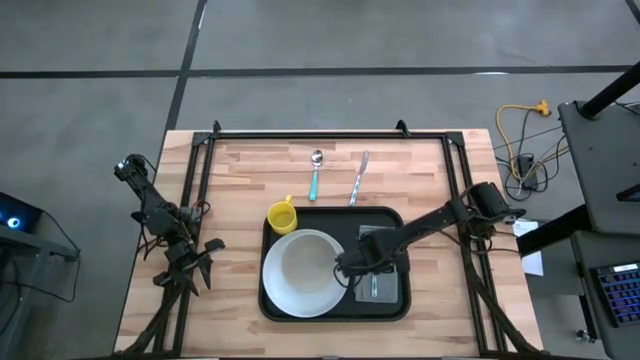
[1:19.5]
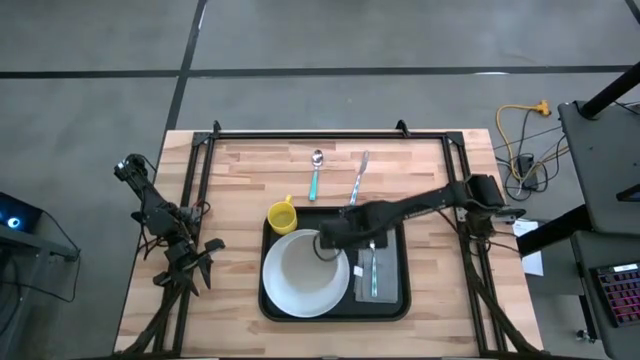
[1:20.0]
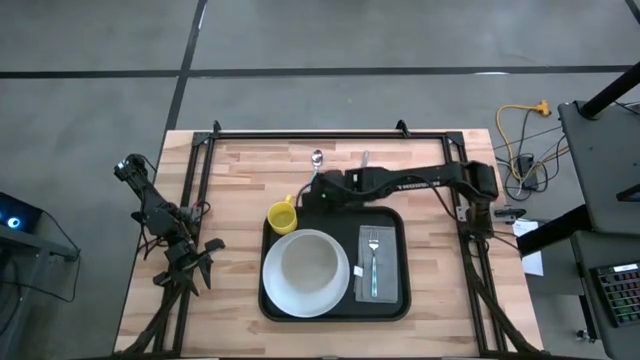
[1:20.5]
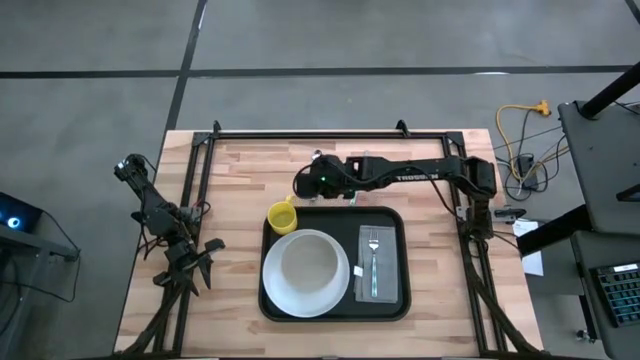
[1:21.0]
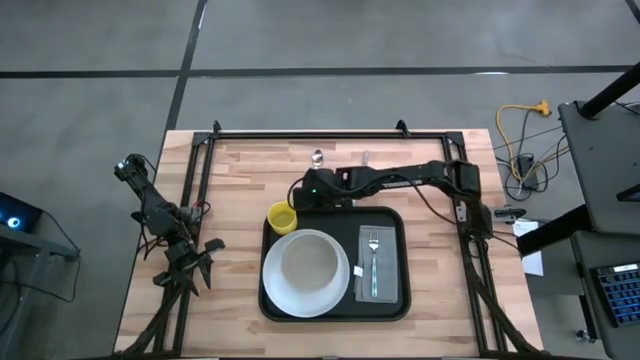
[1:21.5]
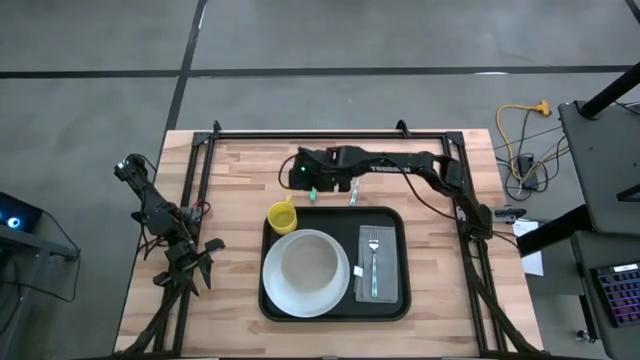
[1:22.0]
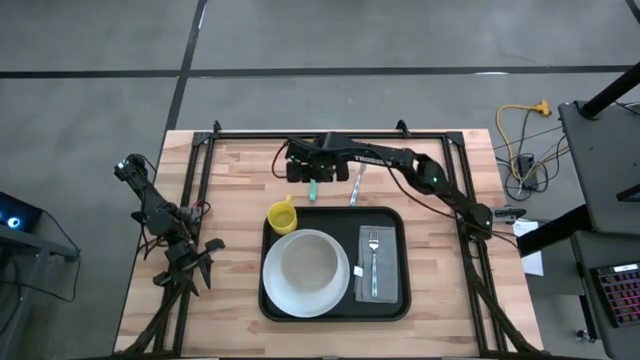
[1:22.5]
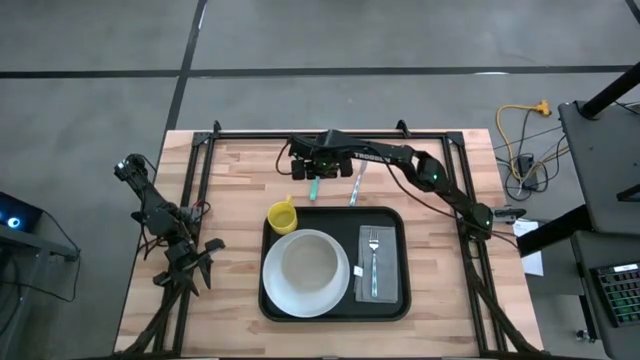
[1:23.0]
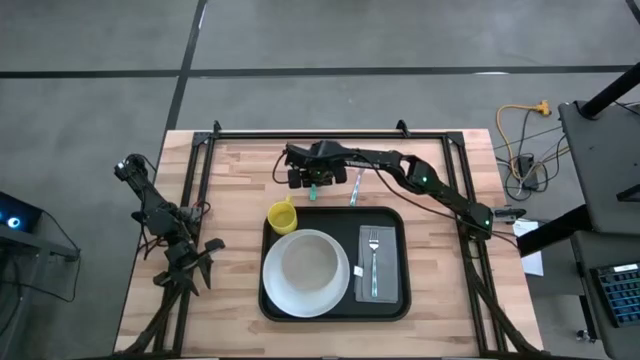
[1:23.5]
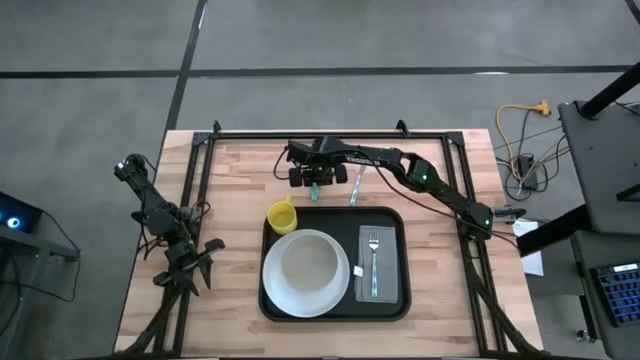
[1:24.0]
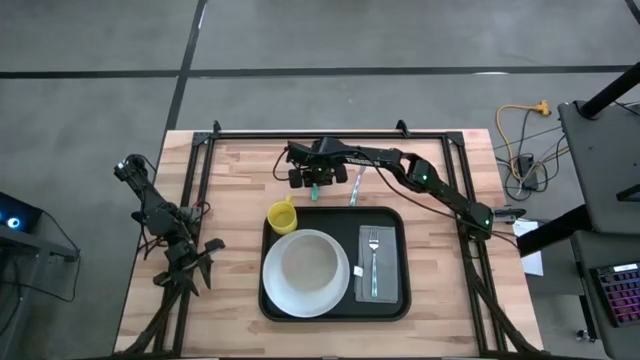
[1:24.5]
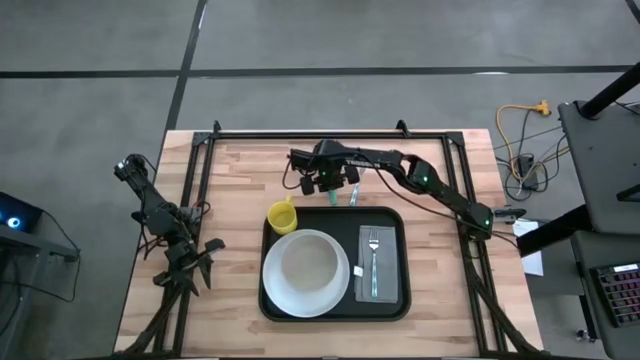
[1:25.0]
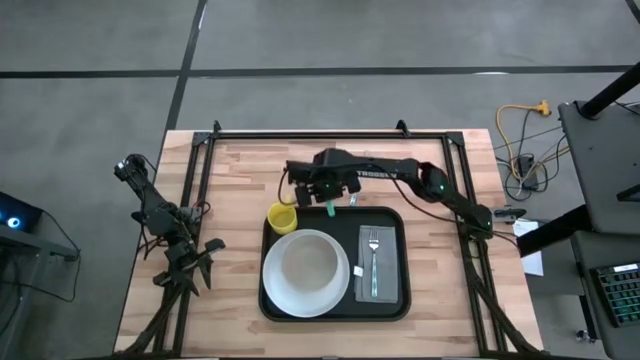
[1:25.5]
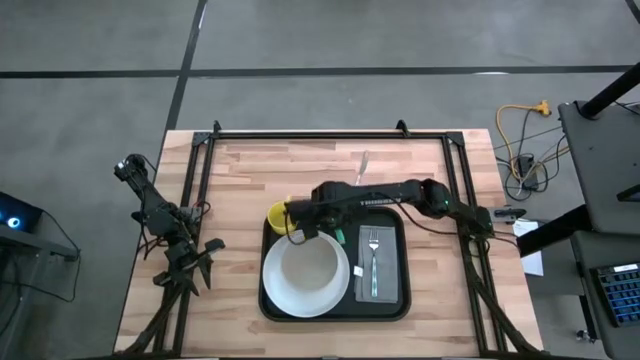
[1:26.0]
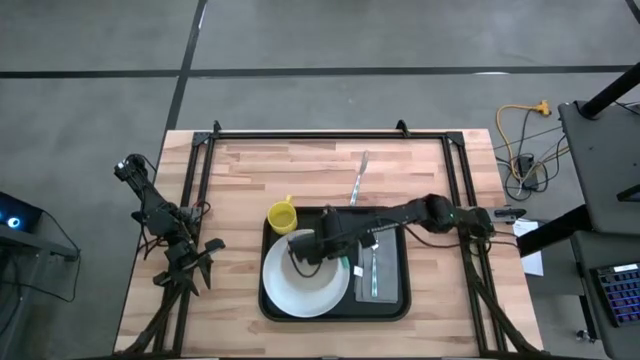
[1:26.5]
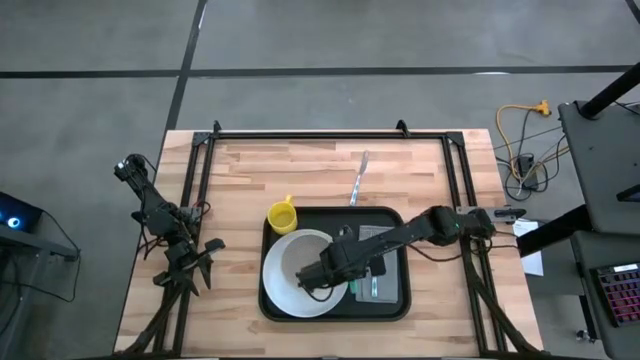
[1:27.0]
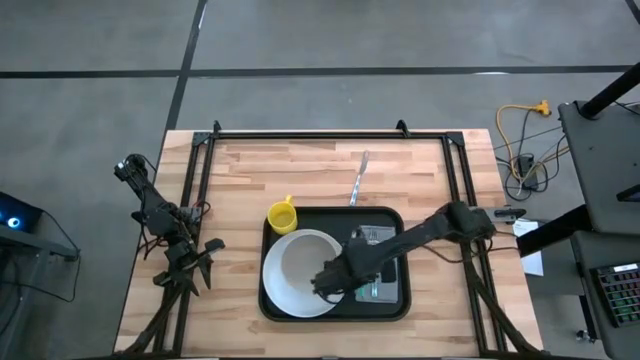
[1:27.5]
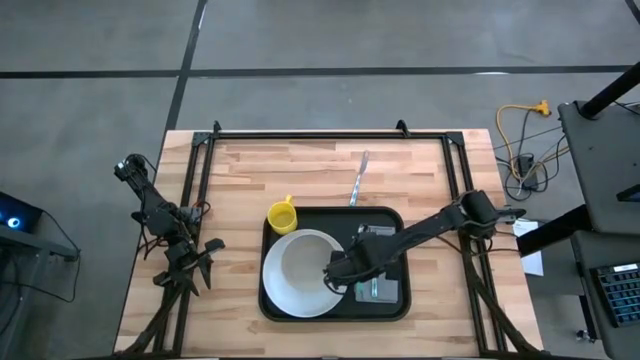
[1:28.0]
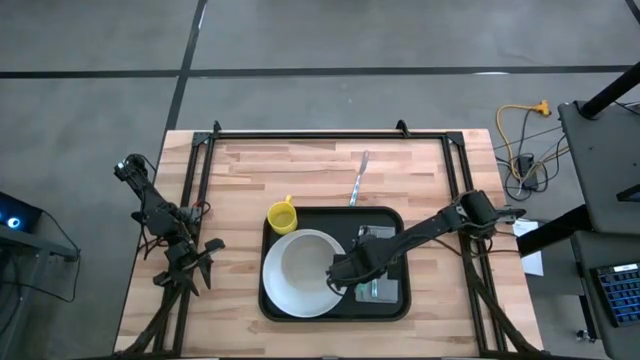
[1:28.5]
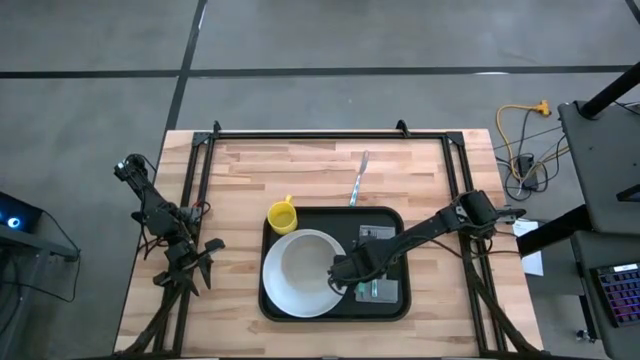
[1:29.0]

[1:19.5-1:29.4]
Task: Set up tray
Put the light blue spoon on the gray napkin to the left of the blue patterned fork

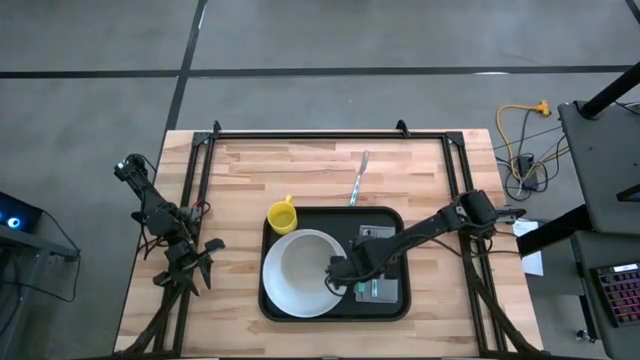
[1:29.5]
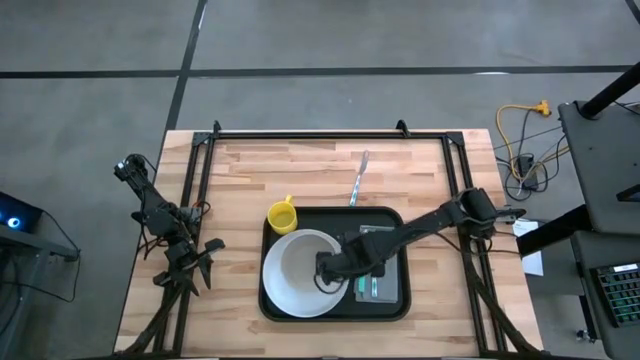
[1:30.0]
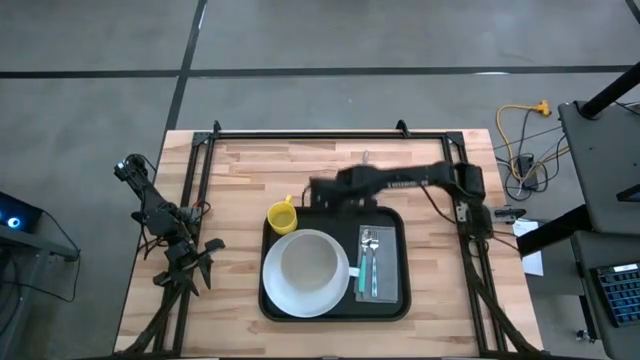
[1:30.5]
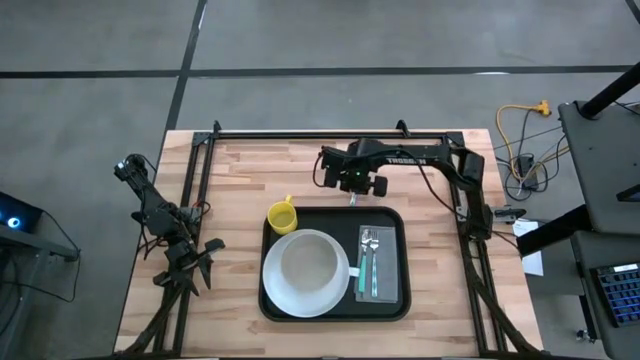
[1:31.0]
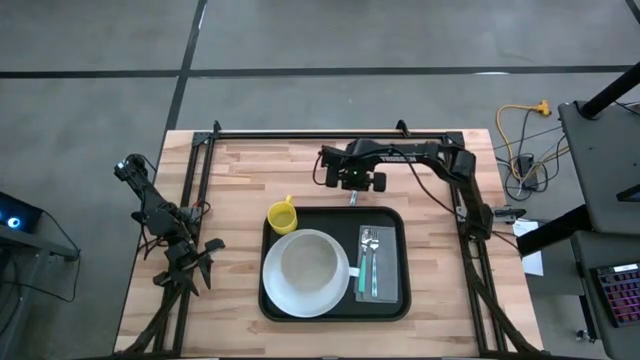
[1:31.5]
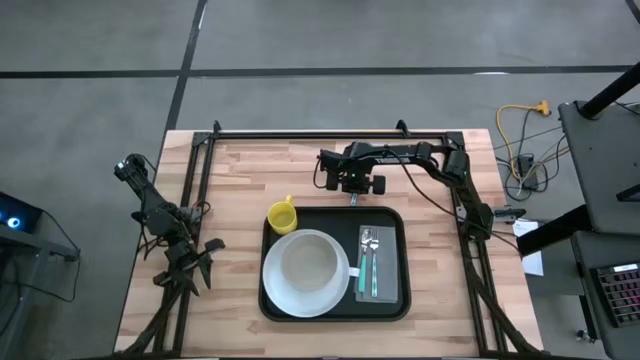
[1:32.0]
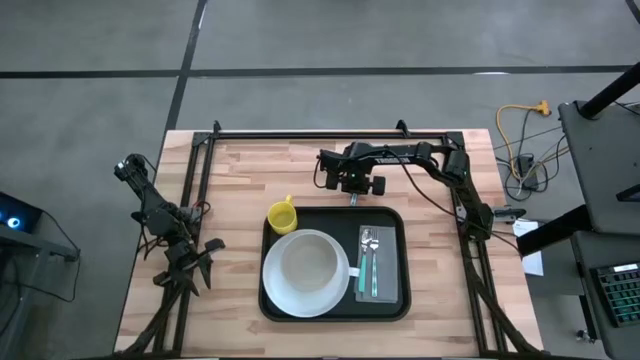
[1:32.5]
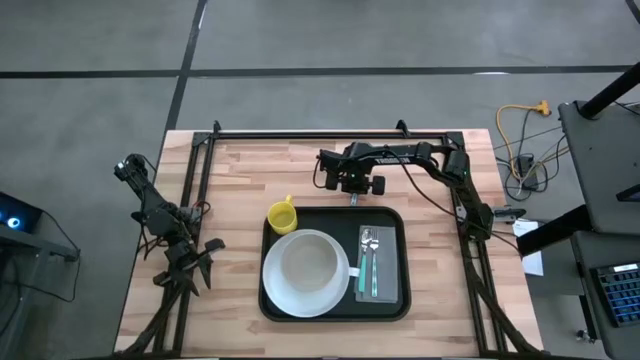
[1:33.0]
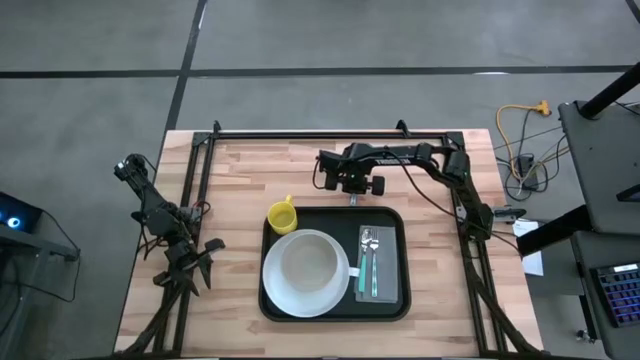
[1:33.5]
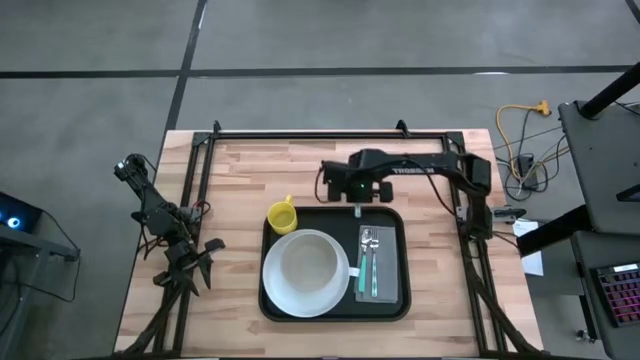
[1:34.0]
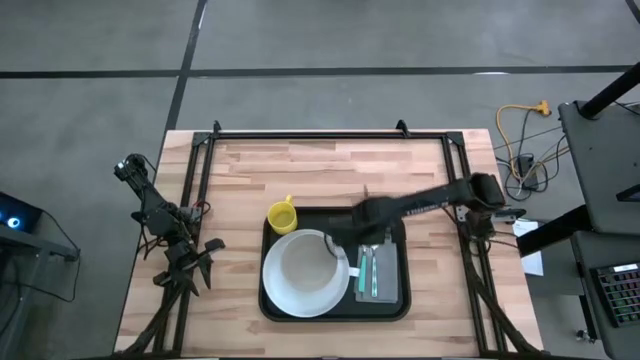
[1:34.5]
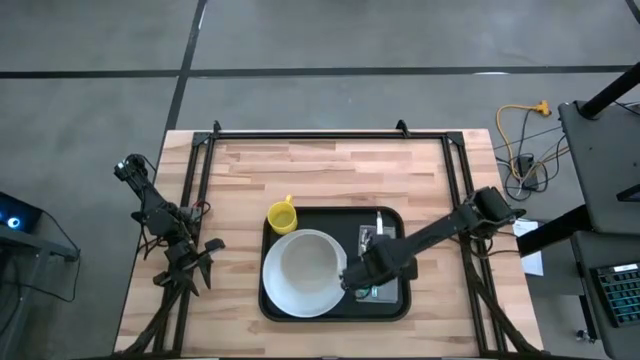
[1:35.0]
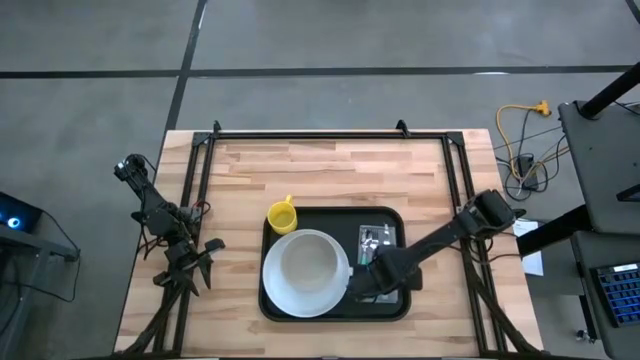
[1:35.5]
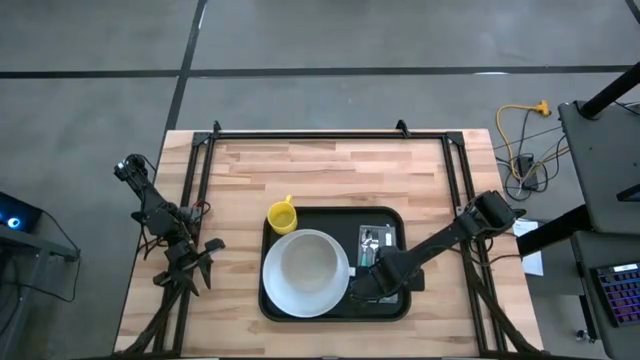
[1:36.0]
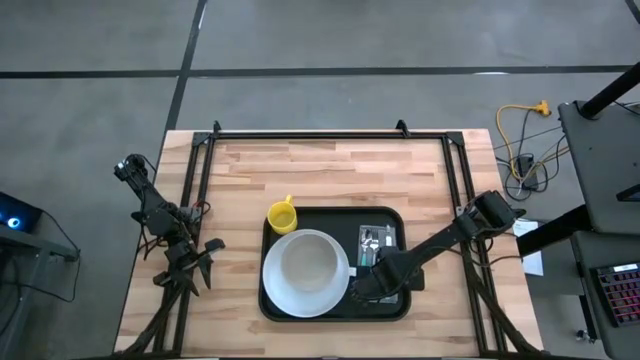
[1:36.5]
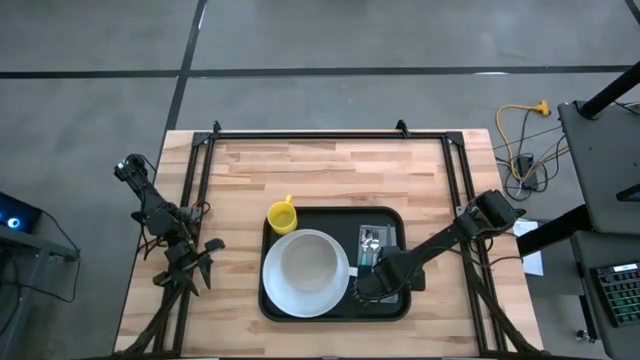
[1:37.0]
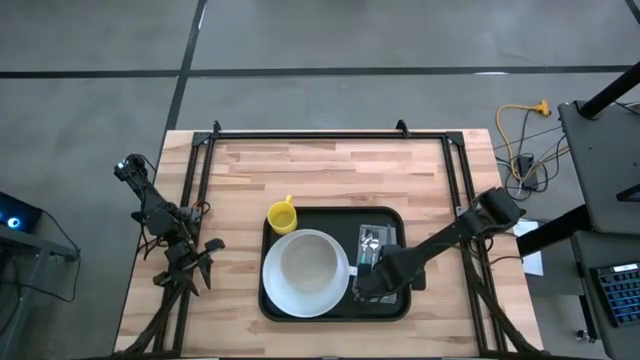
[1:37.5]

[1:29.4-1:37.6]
Put the blue patterned knife on the gray napkin to the right of the blue patterned fork
